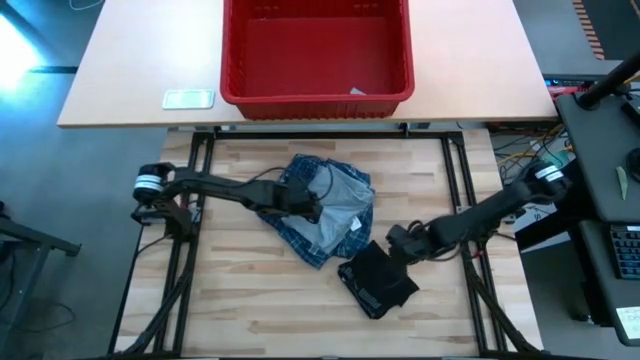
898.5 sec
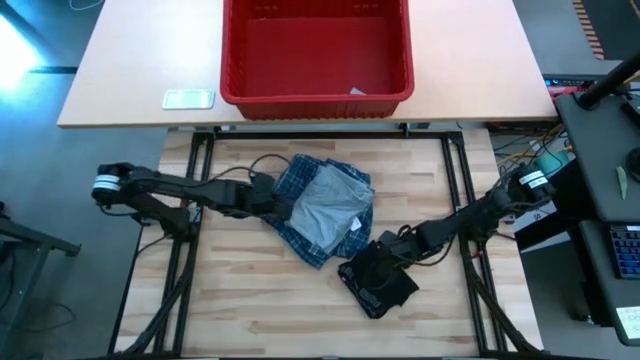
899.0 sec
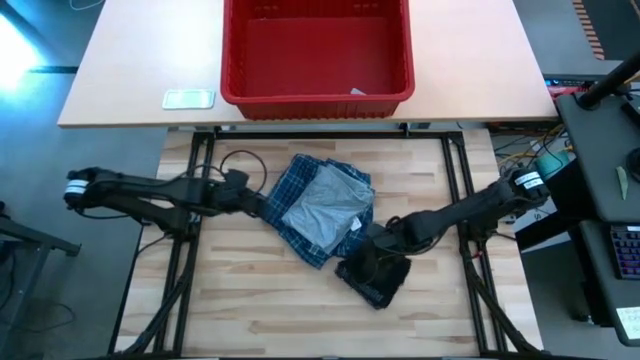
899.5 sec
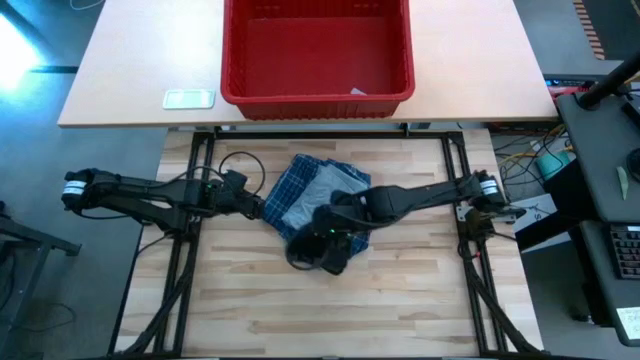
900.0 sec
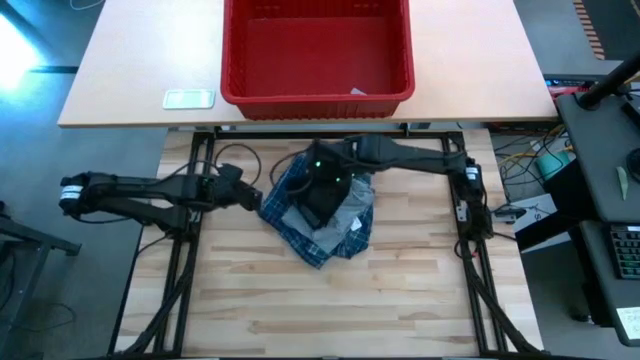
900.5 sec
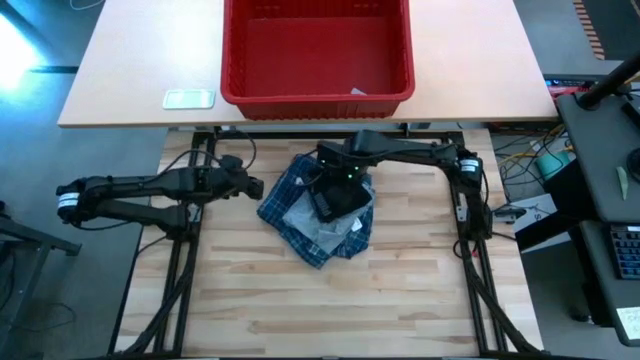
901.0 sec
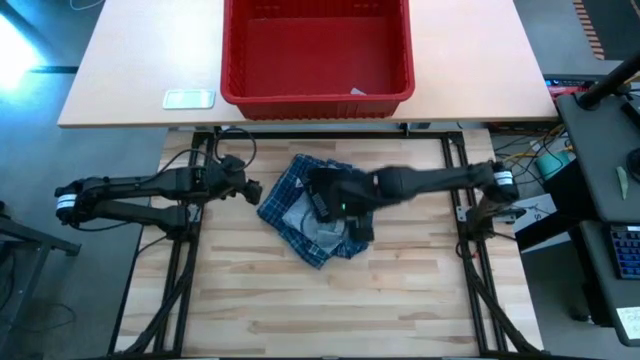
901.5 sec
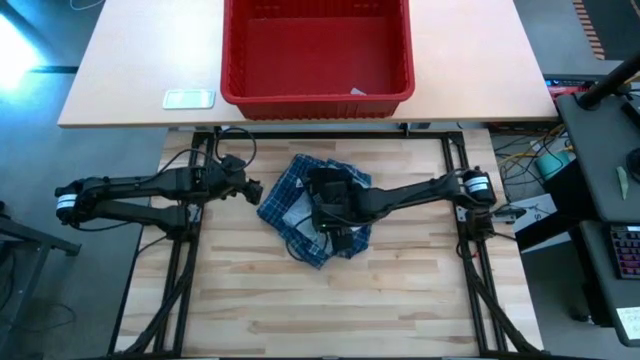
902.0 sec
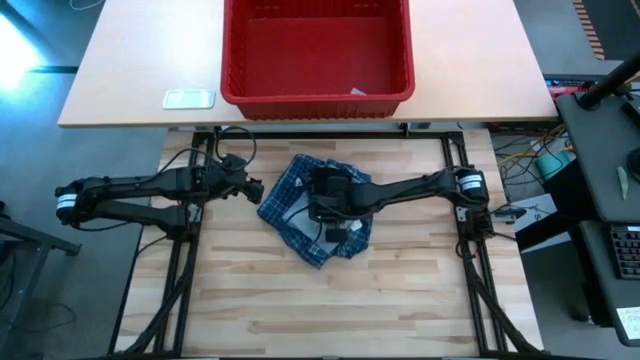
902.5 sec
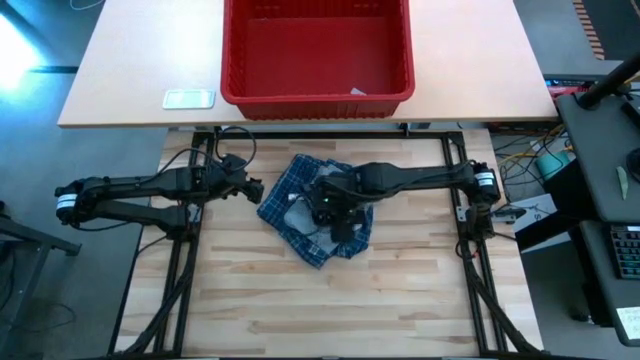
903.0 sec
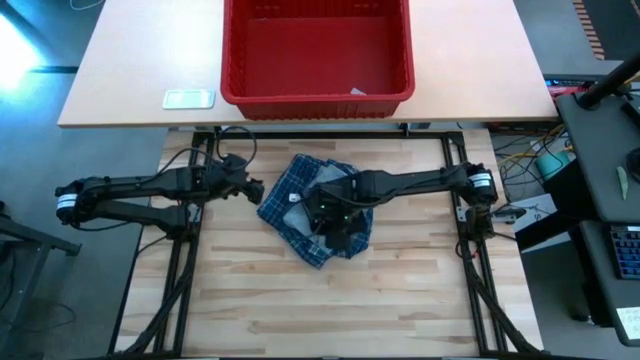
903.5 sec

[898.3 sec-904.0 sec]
Task: Fold Laundry from Bin
Stack the black boxer on top of the gray shirt

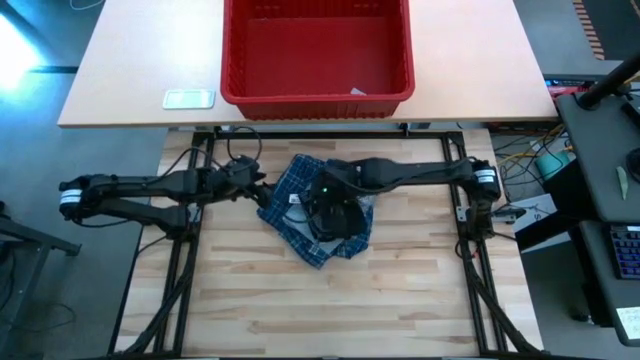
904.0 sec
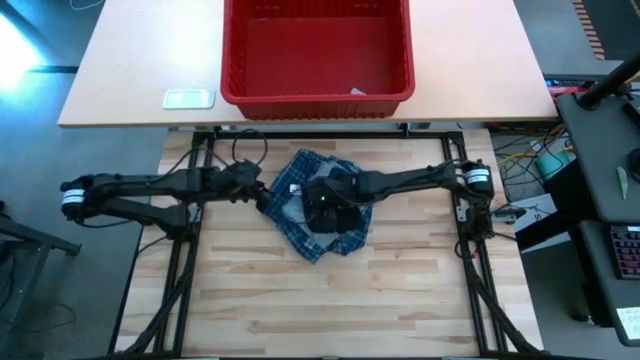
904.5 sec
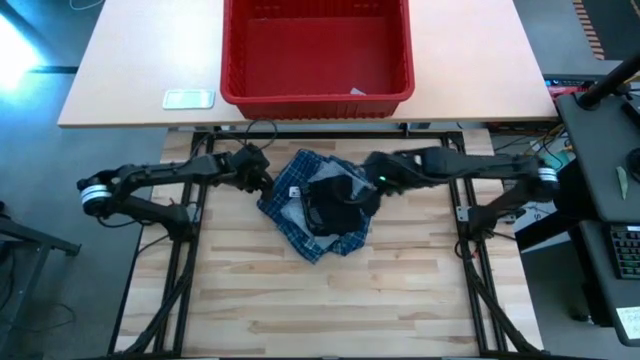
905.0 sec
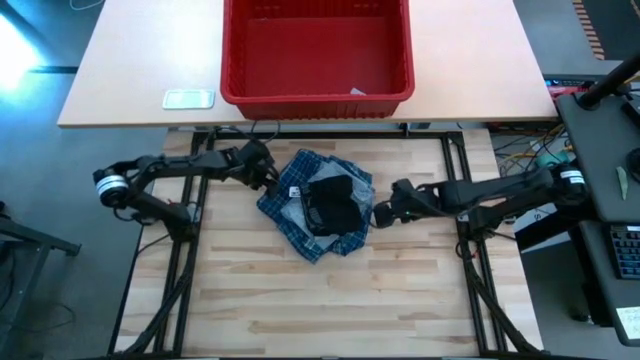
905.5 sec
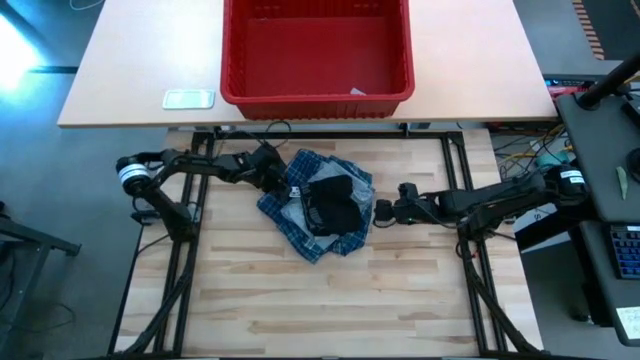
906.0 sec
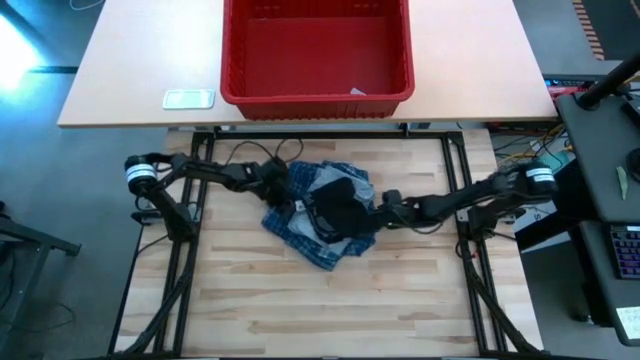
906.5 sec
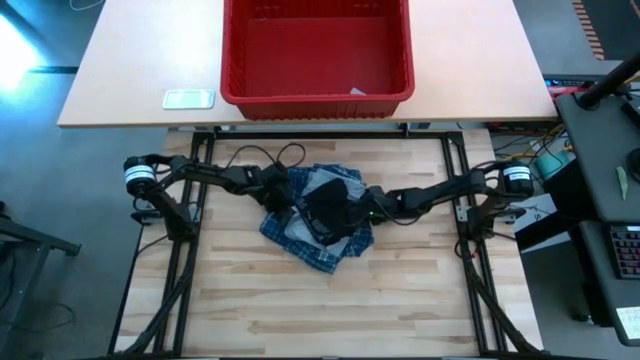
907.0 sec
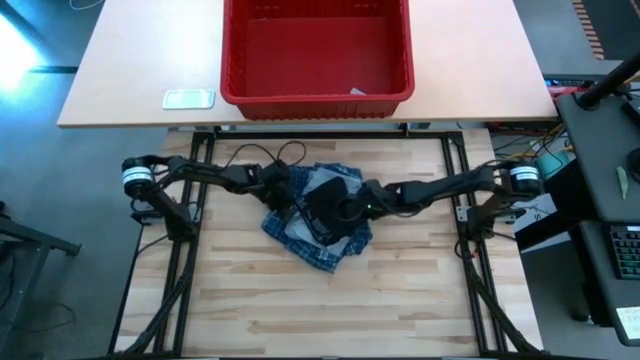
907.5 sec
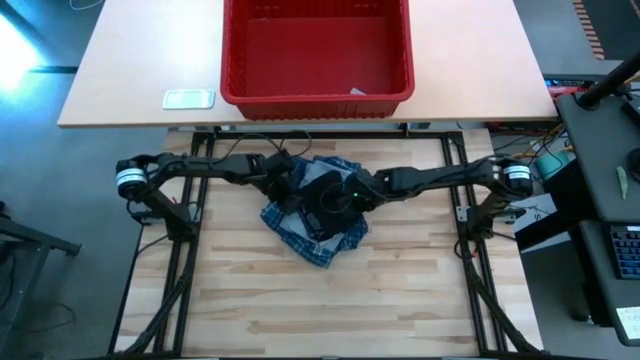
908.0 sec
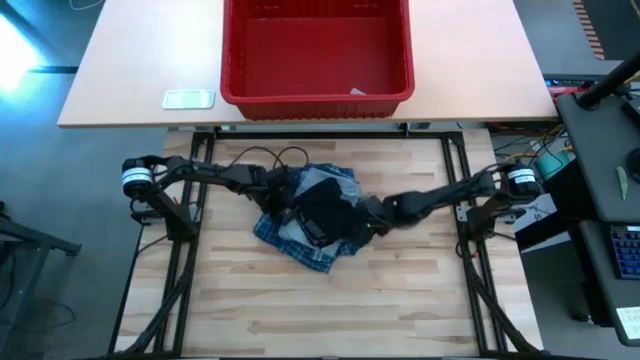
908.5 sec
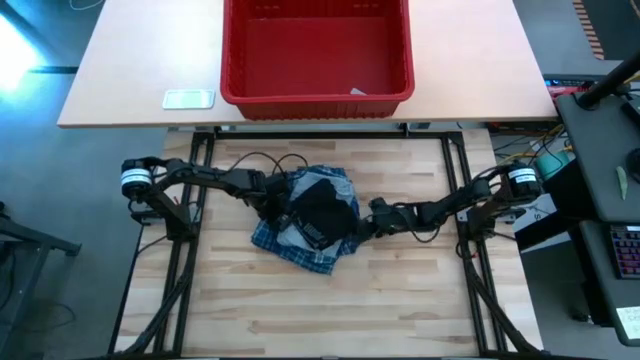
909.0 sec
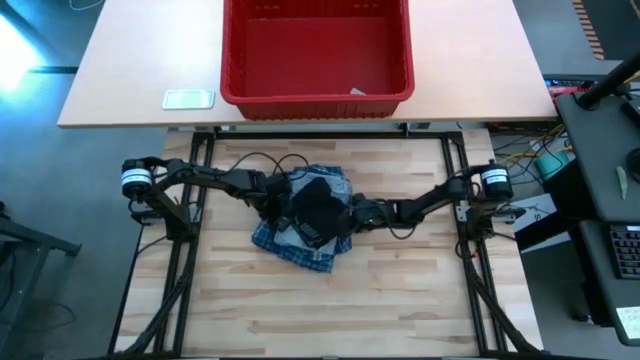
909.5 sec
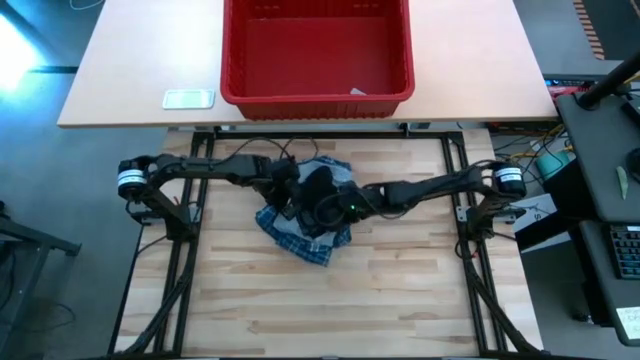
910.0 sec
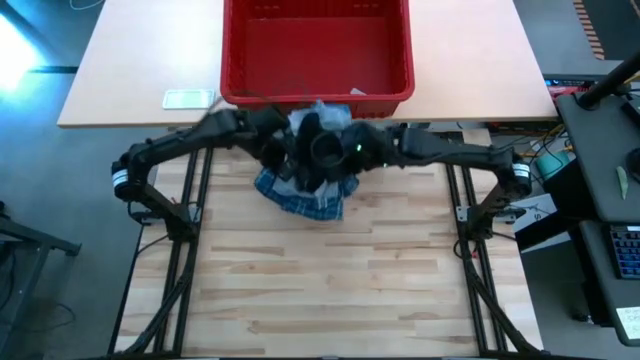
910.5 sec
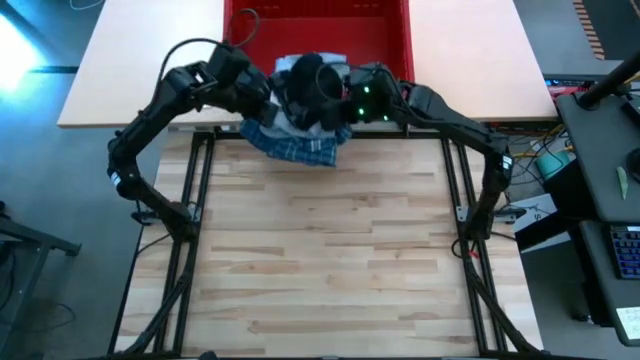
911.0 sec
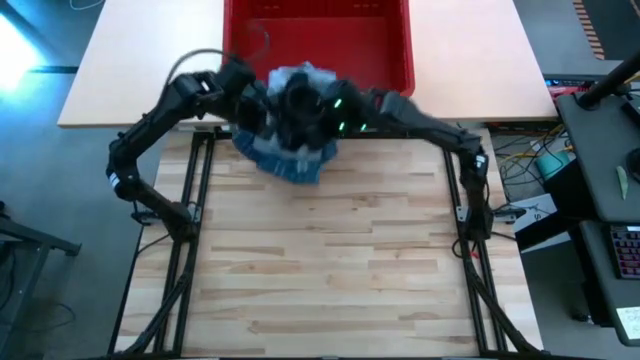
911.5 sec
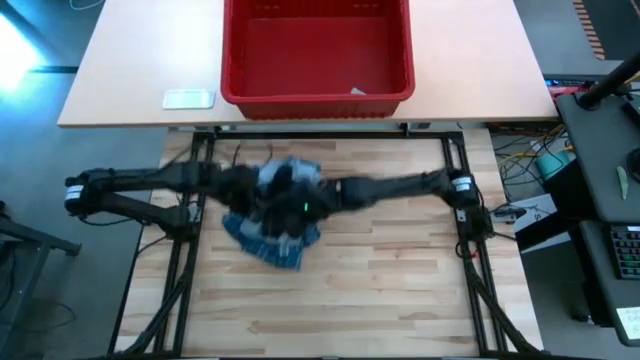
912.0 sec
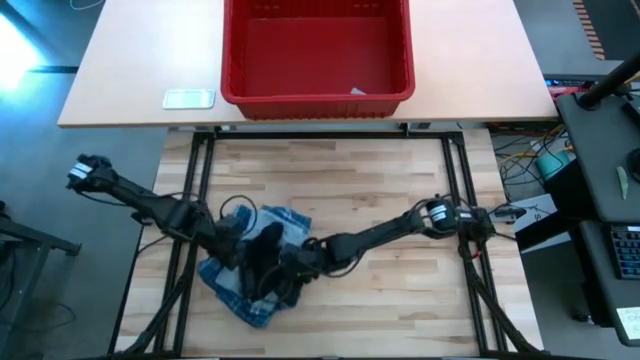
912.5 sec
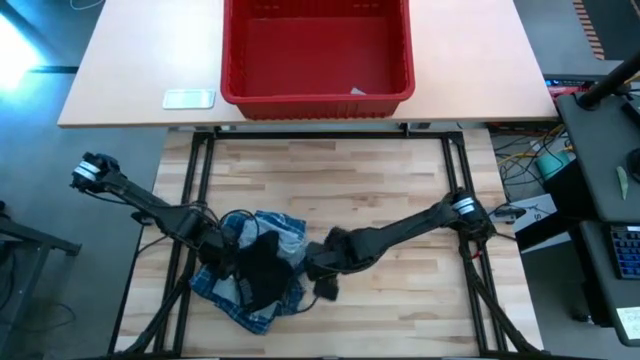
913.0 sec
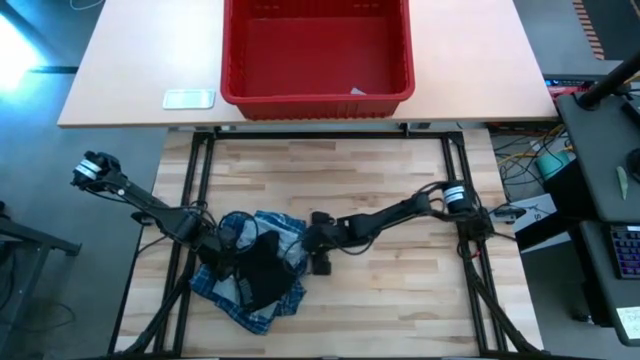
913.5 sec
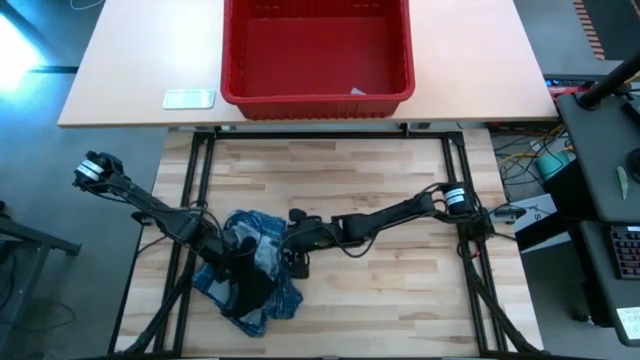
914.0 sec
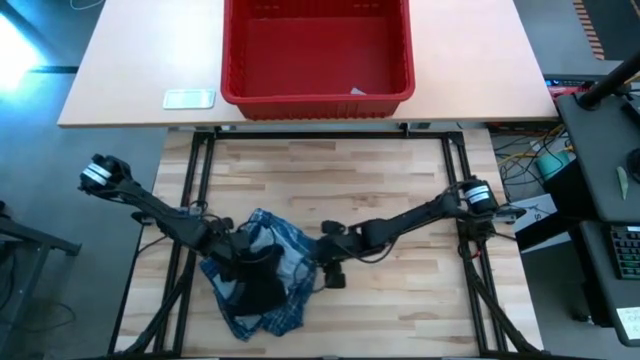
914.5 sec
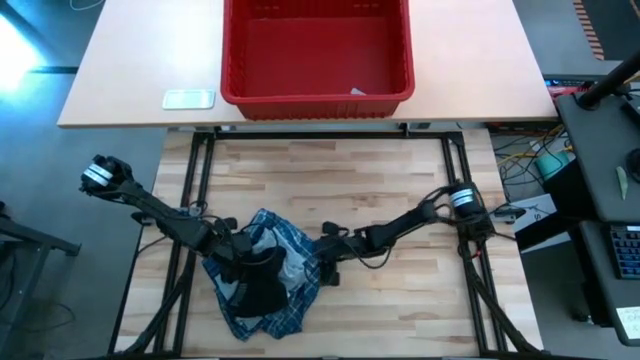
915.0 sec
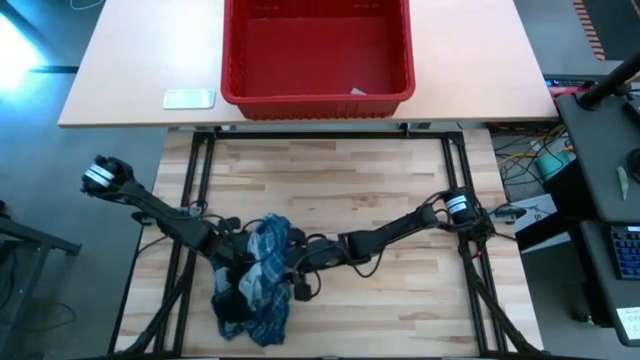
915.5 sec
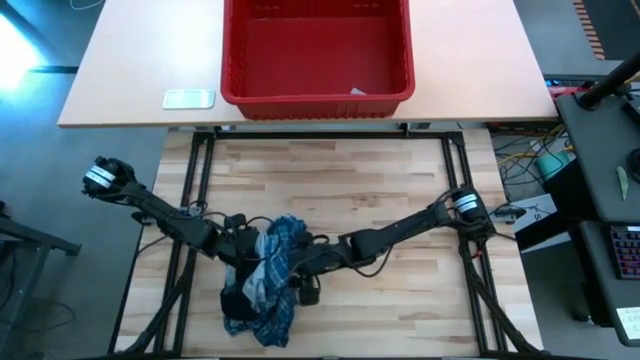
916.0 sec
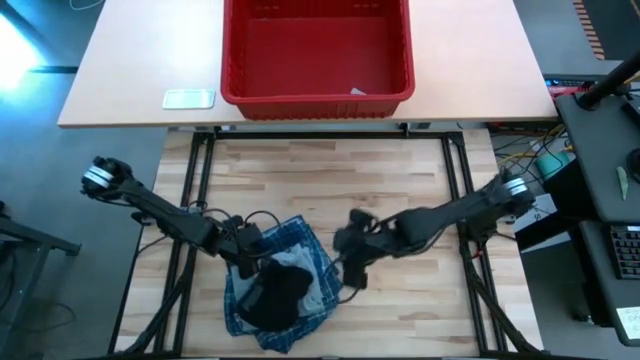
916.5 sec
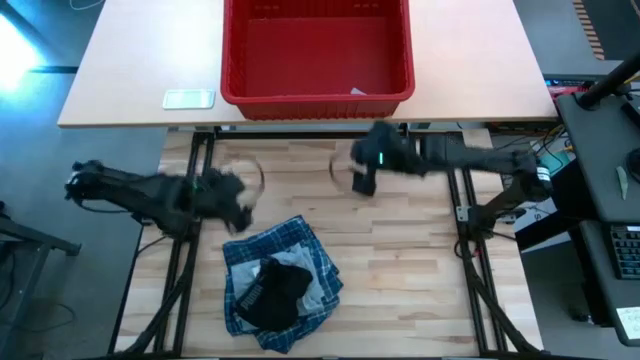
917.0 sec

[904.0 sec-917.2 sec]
Adjust the folded clothes

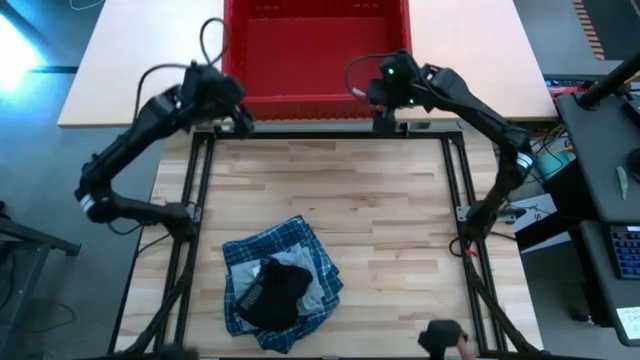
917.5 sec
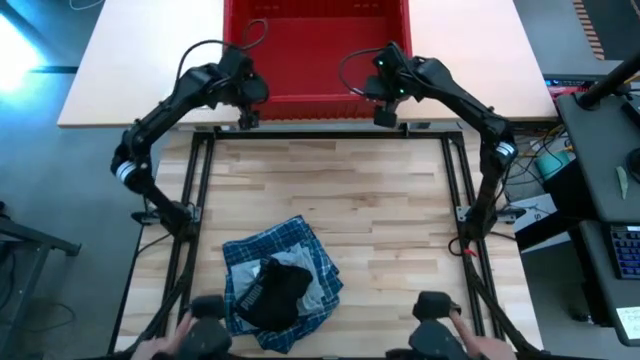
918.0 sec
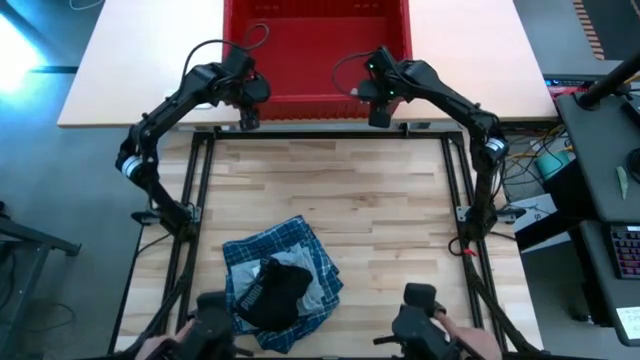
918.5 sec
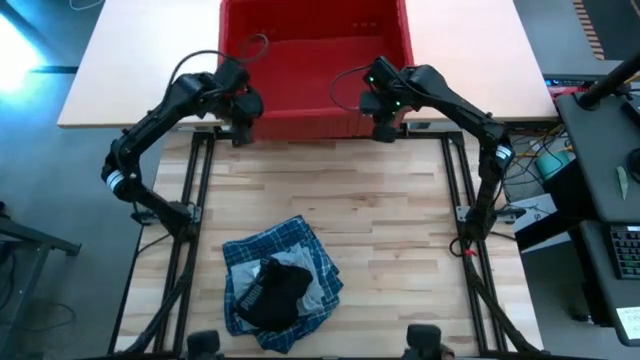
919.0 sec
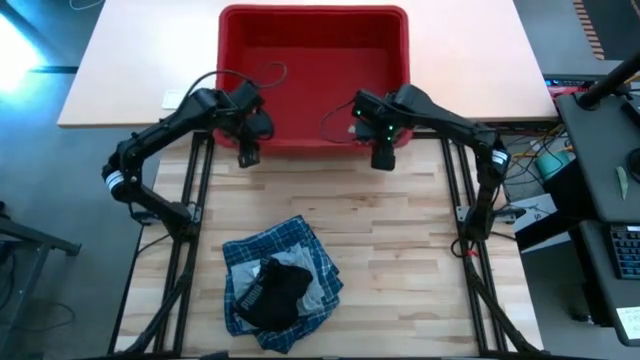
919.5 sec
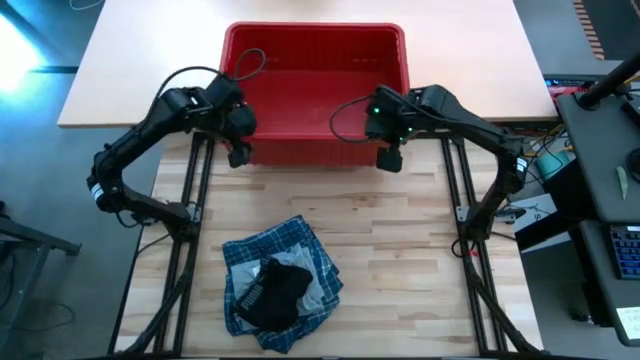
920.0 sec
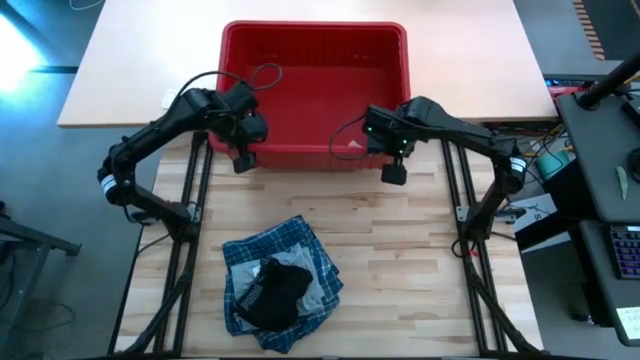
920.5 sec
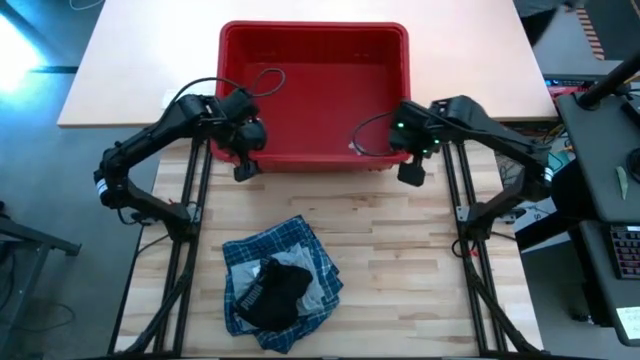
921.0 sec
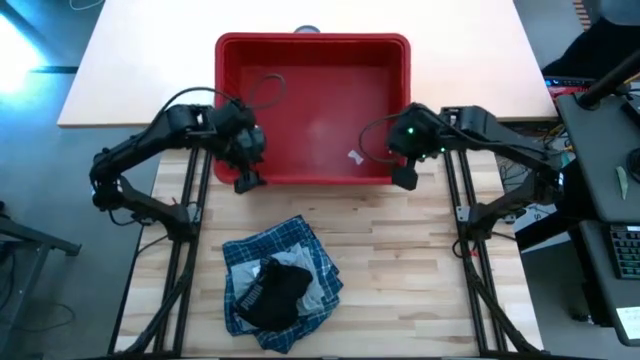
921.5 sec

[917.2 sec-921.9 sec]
Adjust the red bin
